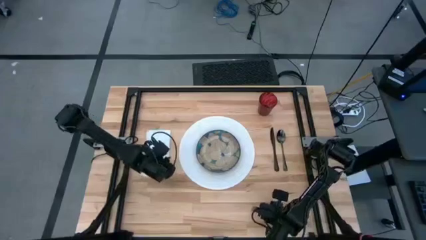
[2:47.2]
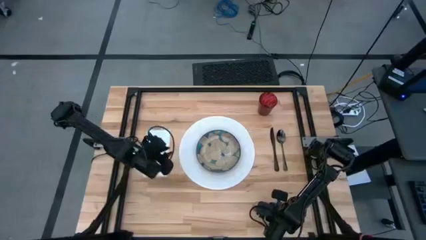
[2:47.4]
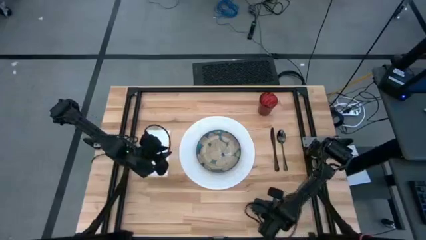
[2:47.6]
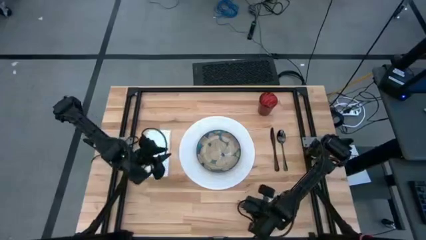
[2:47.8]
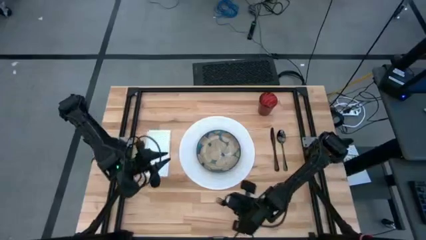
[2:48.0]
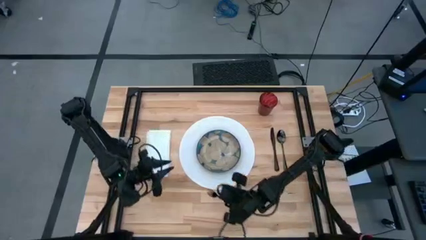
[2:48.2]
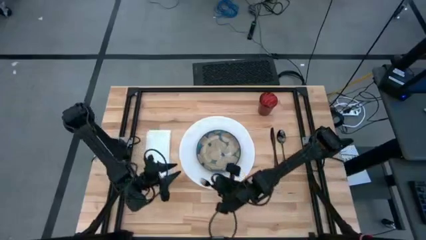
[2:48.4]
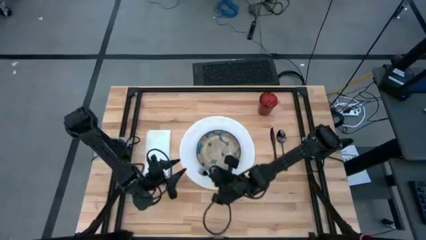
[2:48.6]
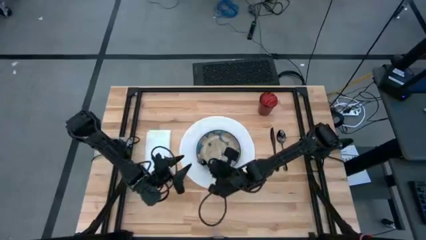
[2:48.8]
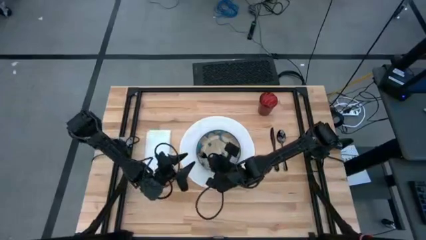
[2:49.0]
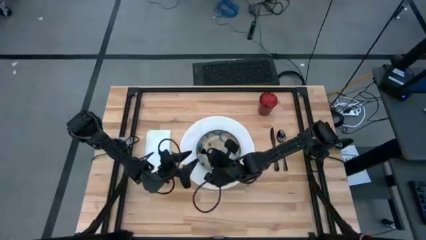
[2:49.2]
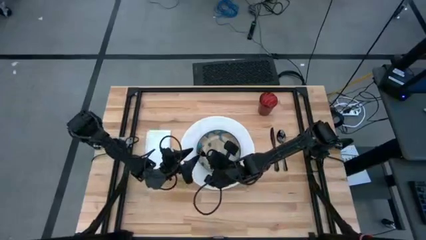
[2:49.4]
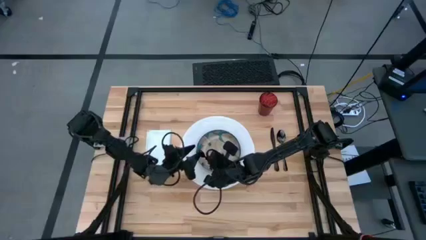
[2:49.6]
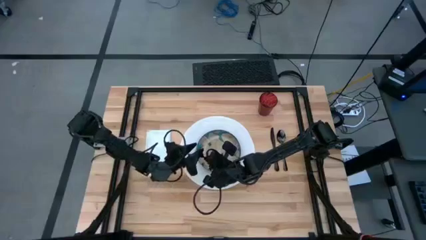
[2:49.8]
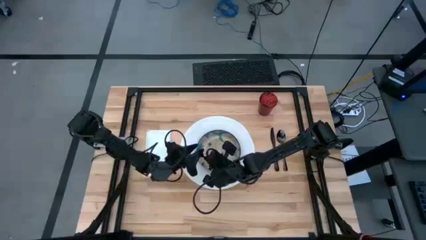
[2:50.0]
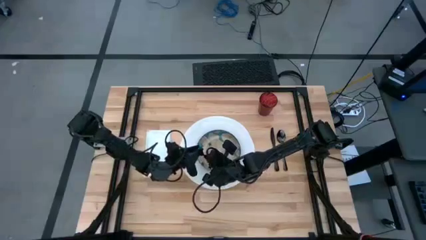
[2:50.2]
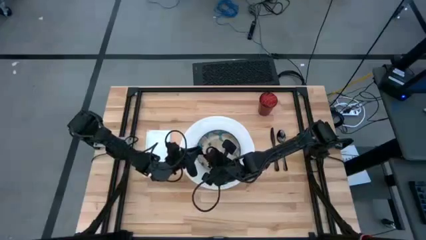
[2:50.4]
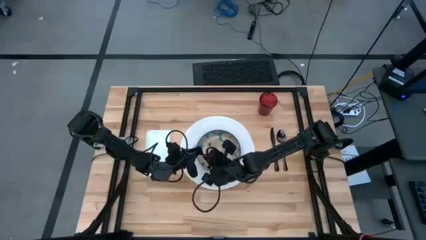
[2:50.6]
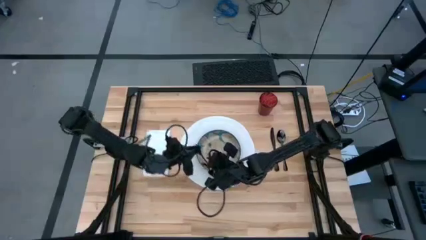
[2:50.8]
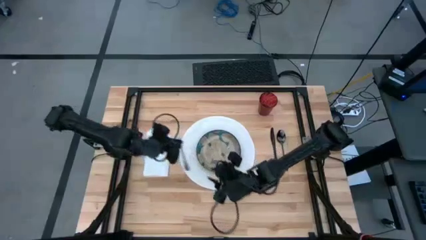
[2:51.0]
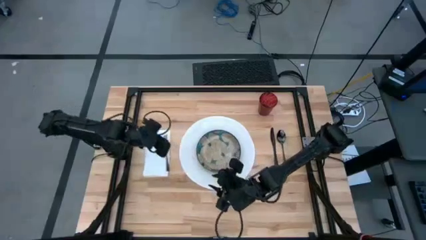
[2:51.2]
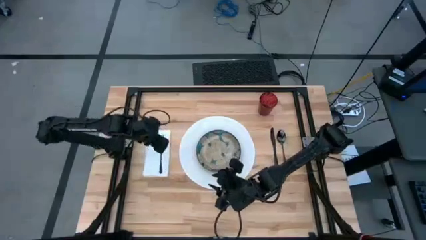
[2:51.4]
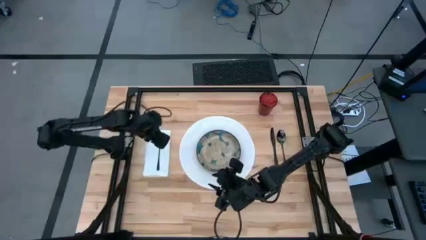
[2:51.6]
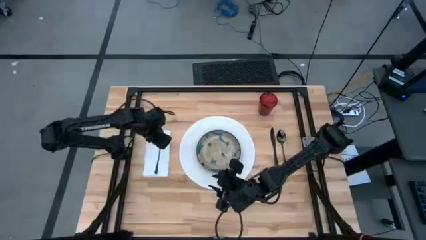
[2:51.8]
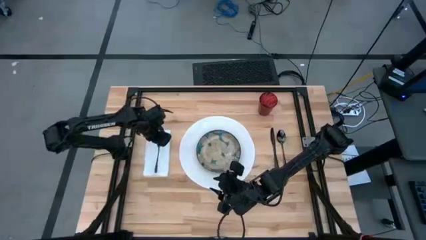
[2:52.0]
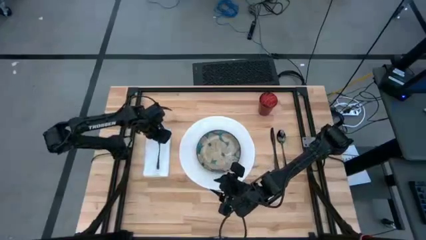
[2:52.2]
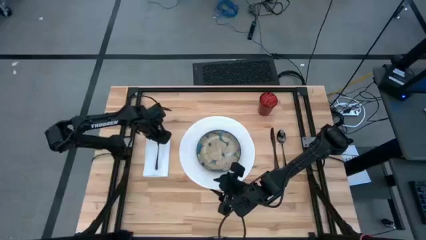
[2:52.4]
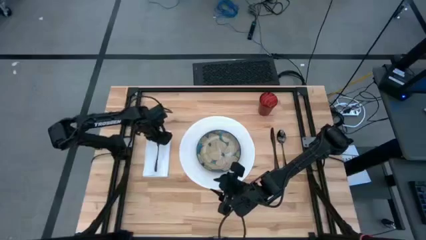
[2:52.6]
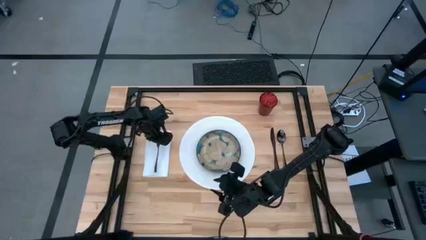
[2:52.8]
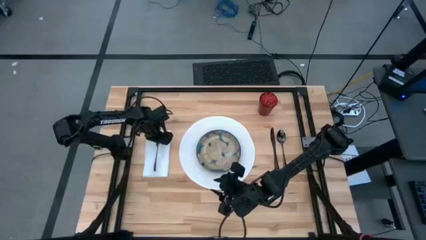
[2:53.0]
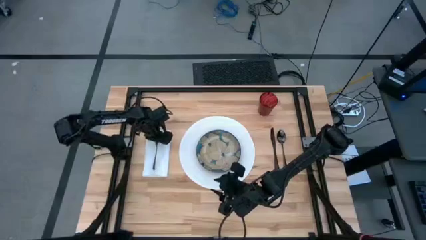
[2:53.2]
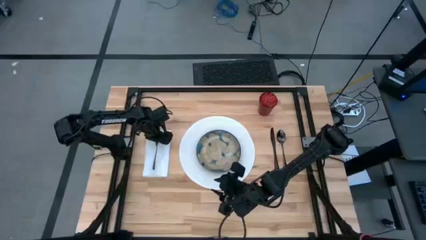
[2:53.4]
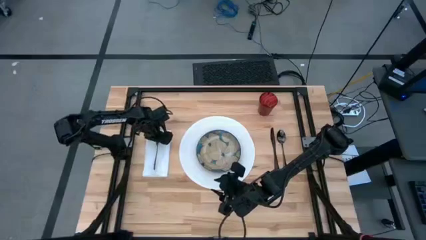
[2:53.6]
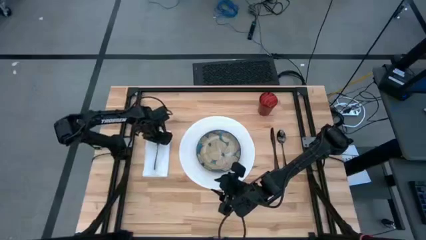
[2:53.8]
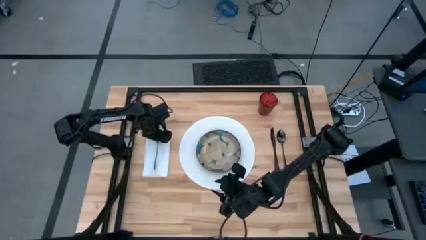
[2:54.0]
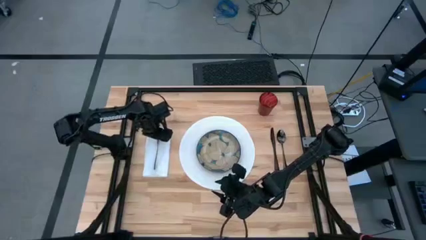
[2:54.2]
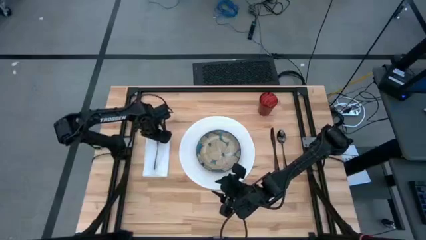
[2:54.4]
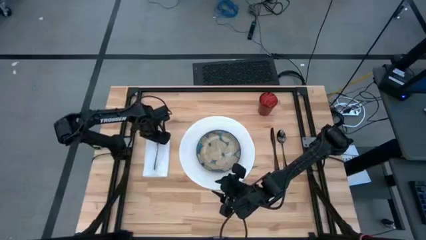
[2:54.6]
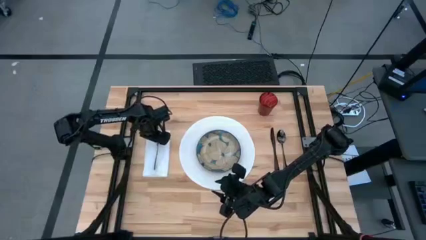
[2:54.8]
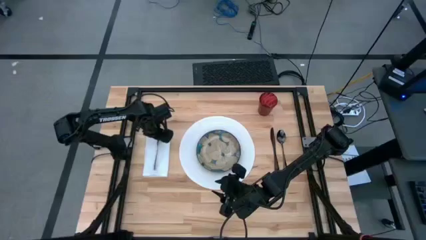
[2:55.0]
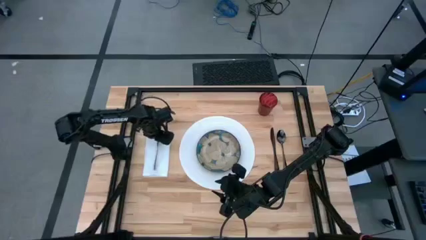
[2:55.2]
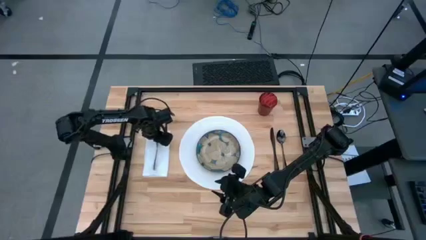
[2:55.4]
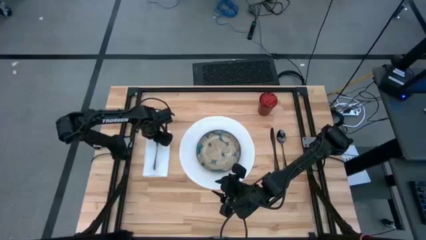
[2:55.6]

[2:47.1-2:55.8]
Task: Set table place
Put the fork on the white table napkin

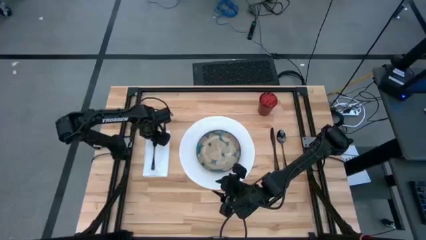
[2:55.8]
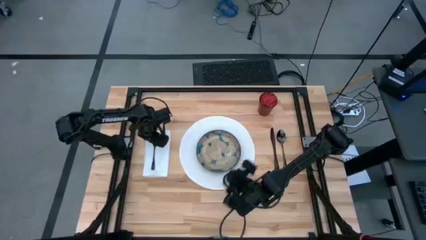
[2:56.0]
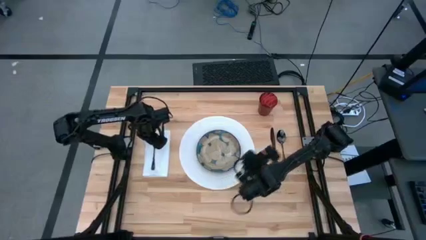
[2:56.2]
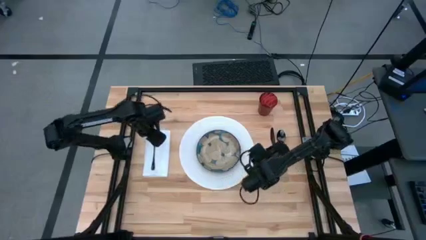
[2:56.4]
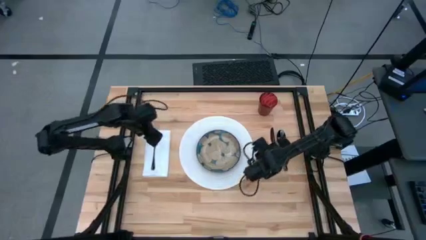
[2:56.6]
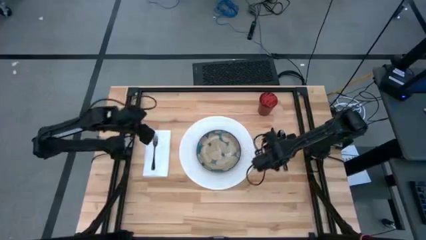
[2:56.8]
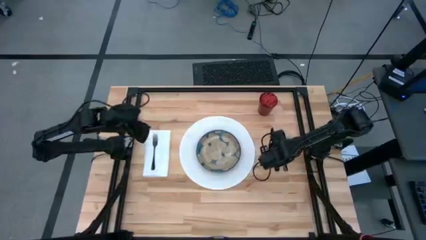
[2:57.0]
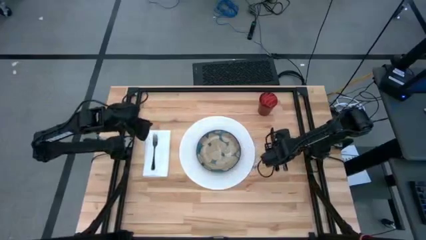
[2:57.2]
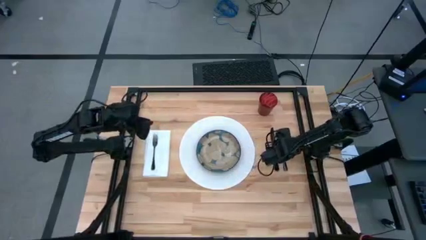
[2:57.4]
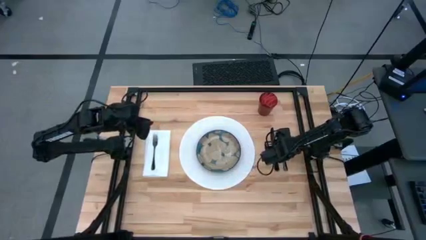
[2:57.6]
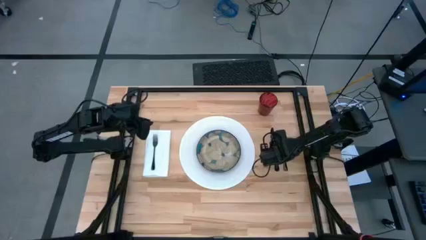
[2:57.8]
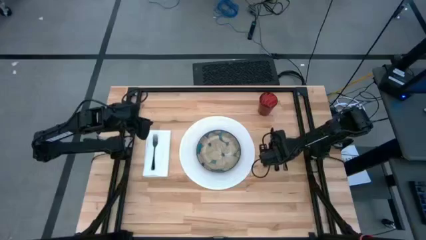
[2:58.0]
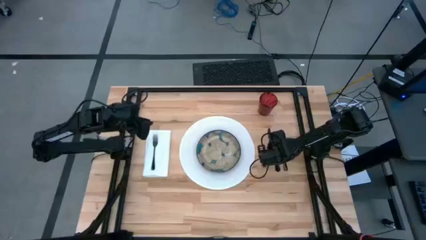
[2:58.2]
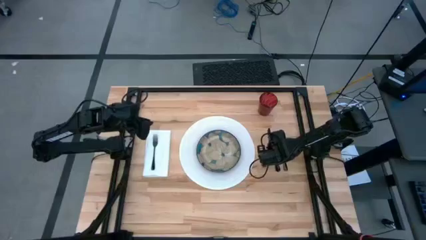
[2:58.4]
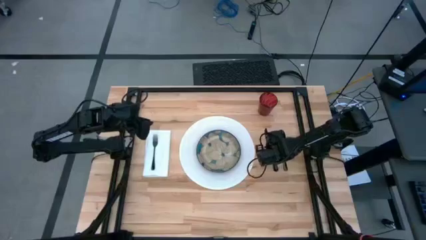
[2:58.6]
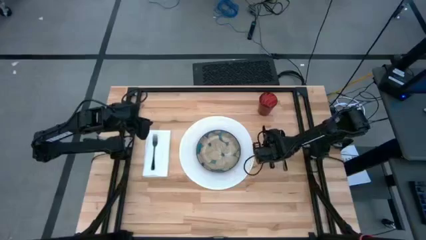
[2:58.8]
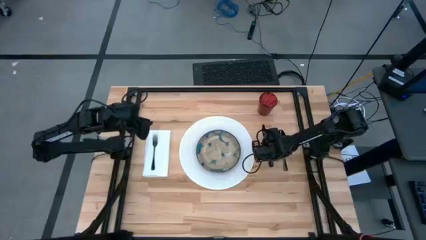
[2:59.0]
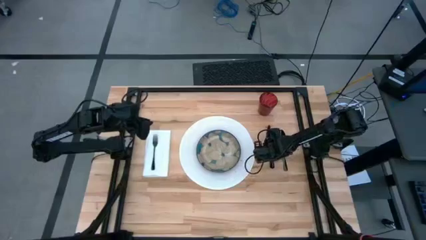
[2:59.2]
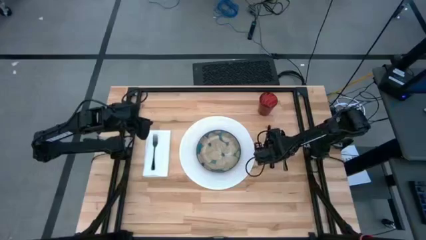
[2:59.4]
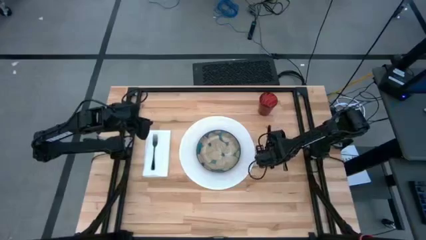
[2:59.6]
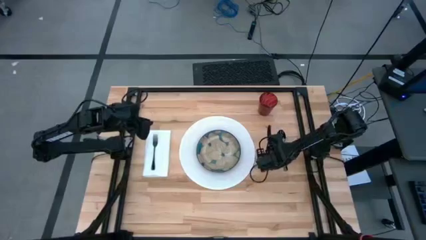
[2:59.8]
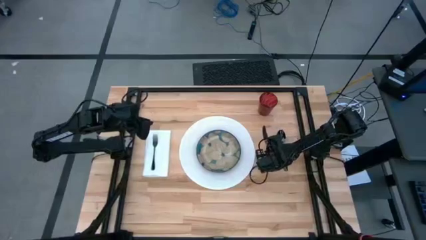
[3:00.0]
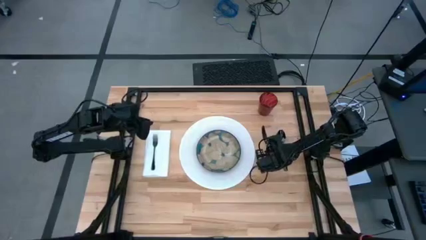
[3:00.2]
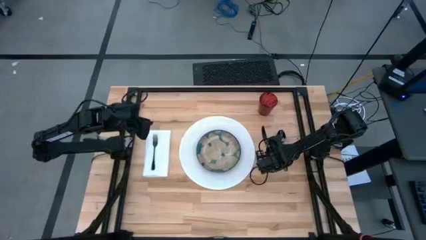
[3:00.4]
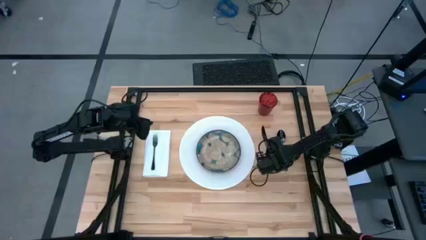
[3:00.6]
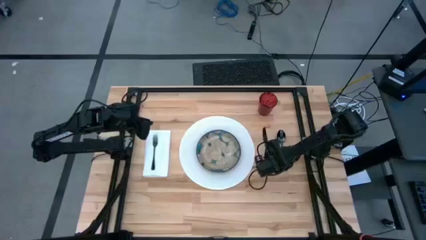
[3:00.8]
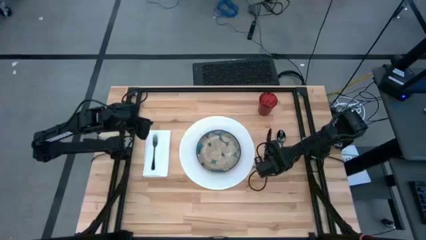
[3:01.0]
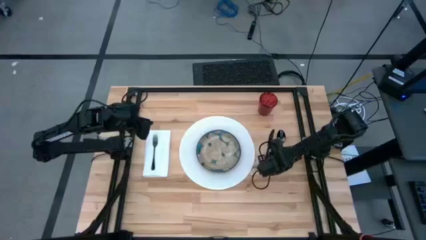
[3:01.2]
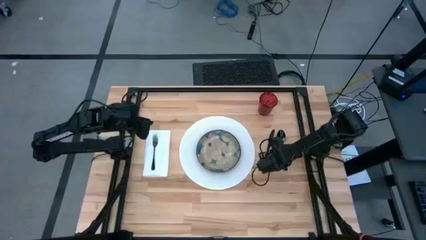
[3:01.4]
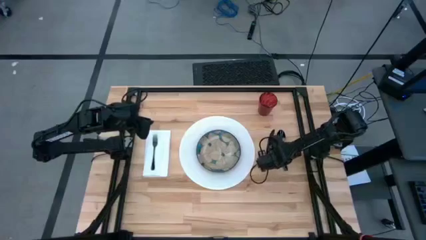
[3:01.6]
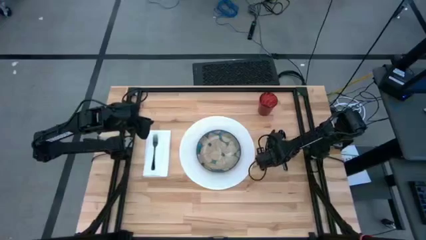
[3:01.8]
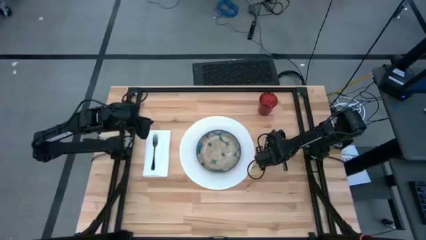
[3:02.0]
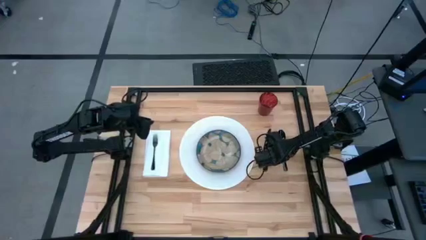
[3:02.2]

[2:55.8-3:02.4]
Adjust the knife beside the table placemat

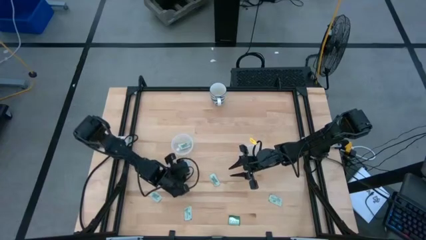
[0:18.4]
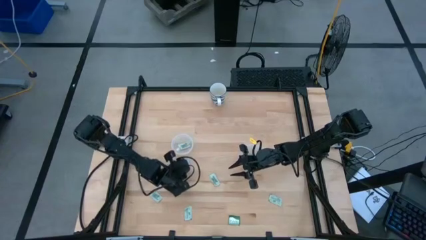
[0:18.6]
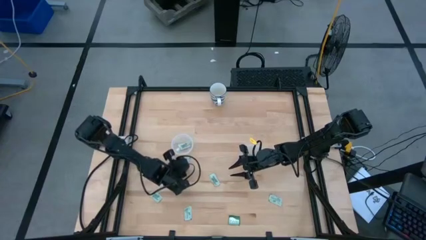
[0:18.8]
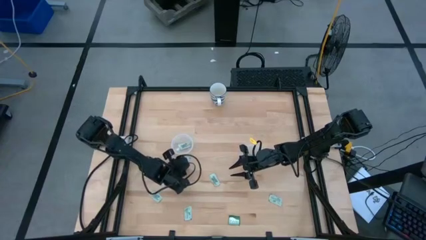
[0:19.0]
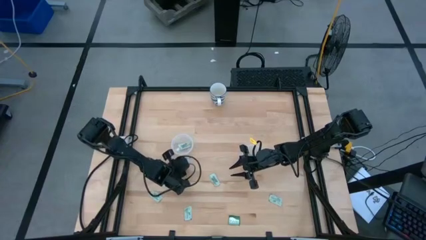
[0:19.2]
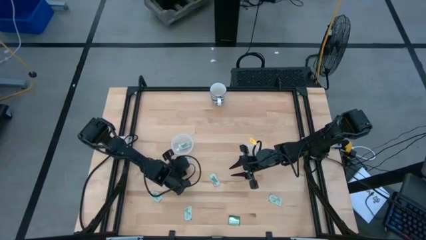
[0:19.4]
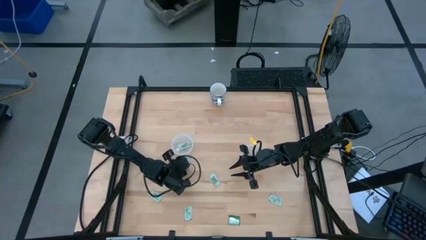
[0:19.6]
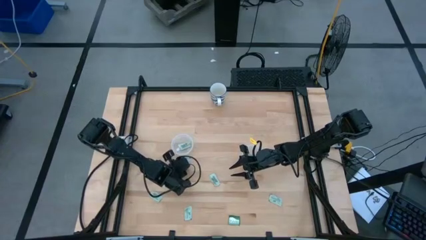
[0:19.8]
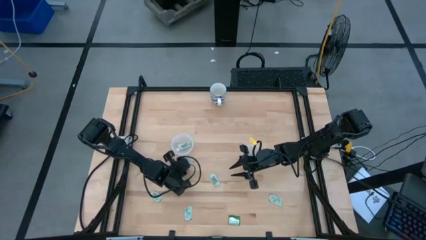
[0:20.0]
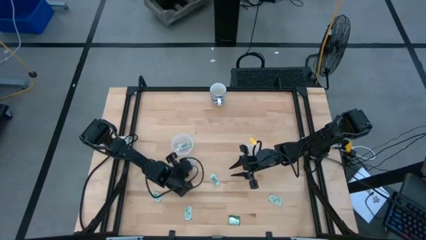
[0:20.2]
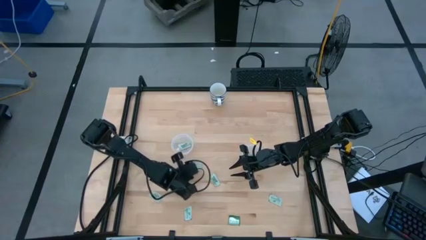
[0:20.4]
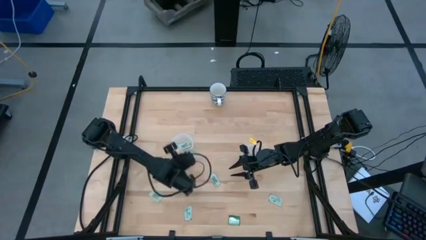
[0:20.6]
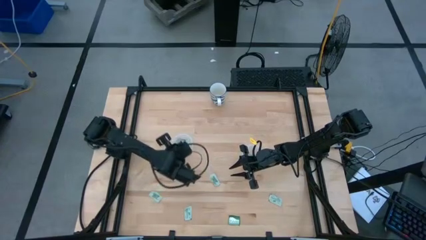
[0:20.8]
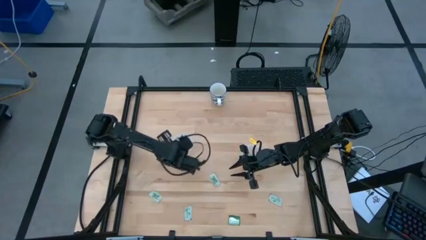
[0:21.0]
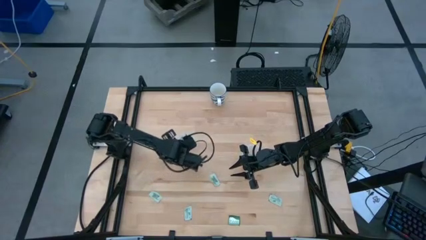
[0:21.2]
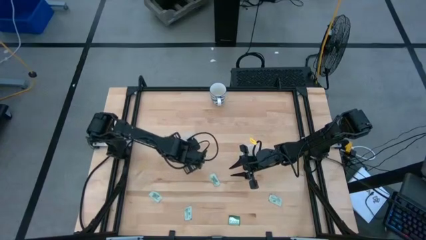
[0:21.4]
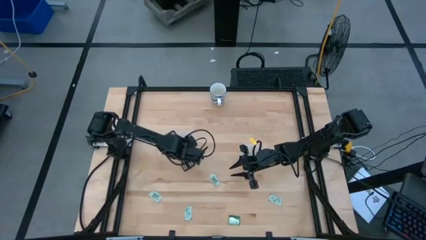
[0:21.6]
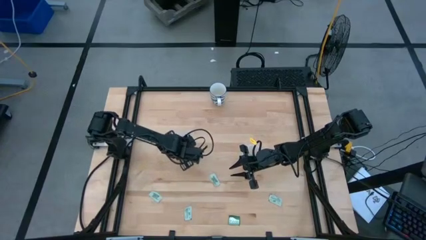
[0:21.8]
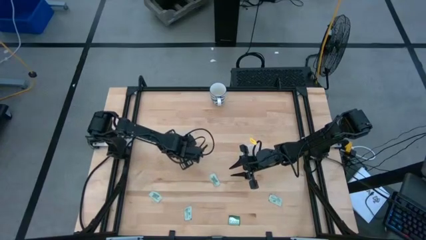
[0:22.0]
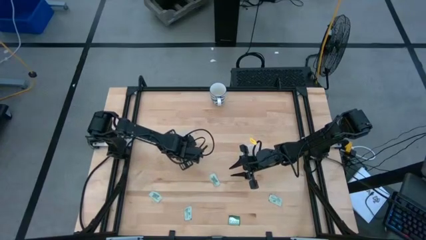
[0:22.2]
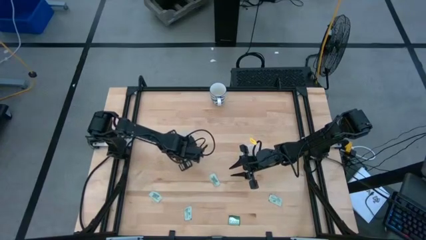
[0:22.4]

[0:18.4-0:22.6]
Task: Pick and place Stevia / Truvia into bins
Put the light green stevia packet into the left transparent container
